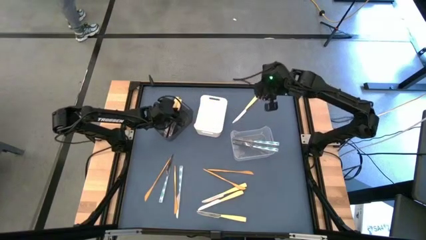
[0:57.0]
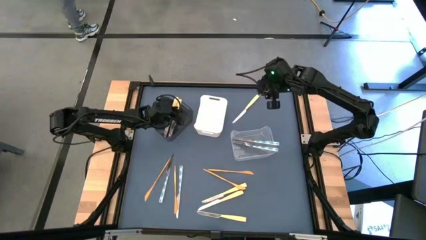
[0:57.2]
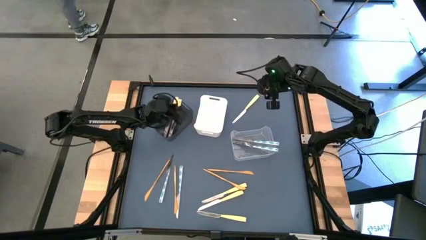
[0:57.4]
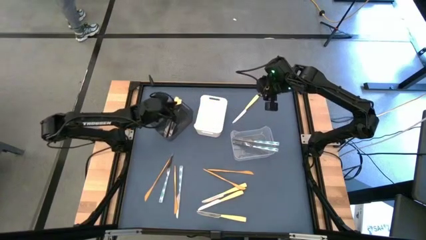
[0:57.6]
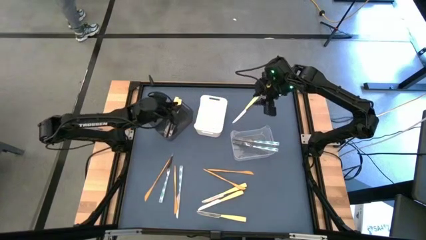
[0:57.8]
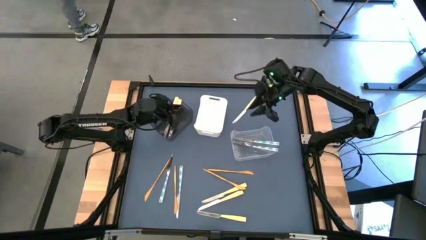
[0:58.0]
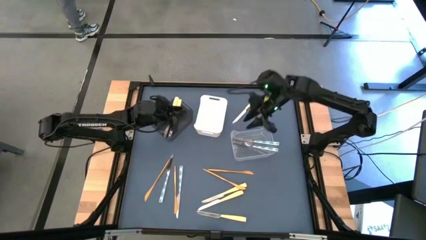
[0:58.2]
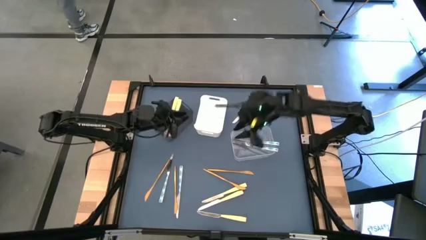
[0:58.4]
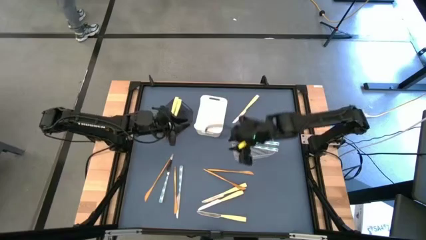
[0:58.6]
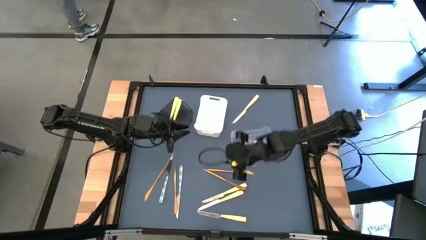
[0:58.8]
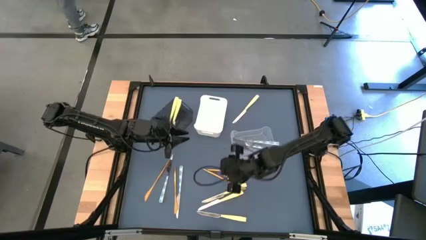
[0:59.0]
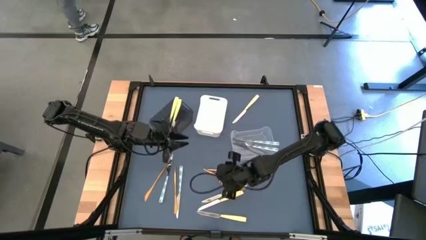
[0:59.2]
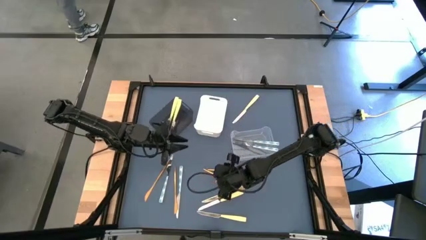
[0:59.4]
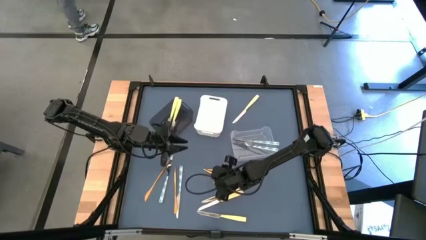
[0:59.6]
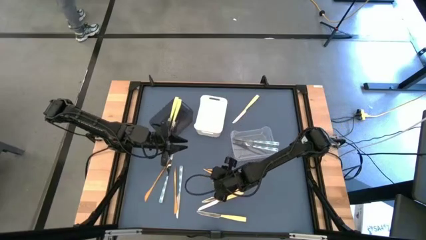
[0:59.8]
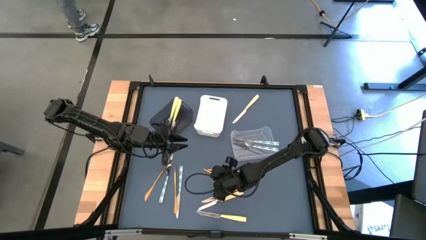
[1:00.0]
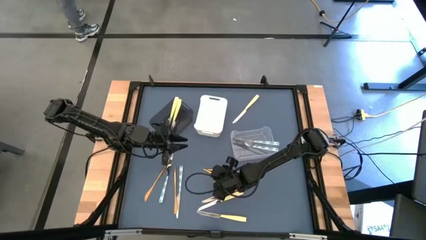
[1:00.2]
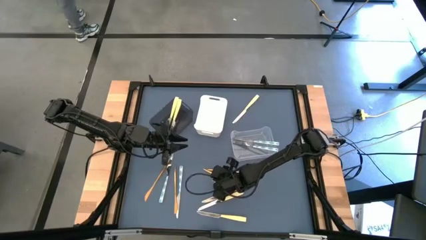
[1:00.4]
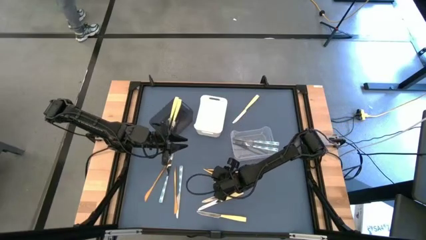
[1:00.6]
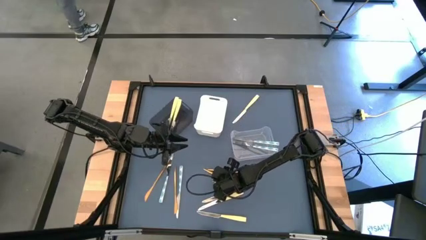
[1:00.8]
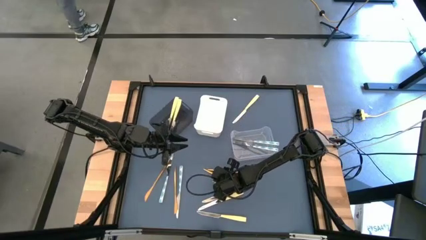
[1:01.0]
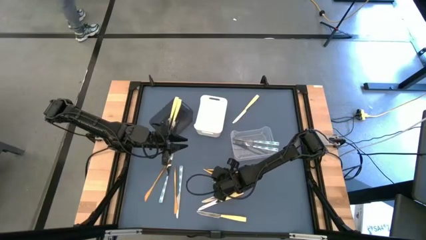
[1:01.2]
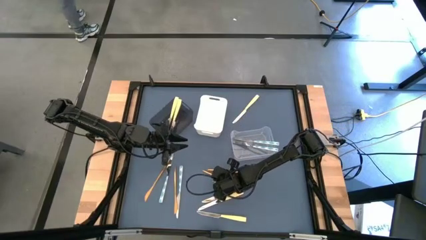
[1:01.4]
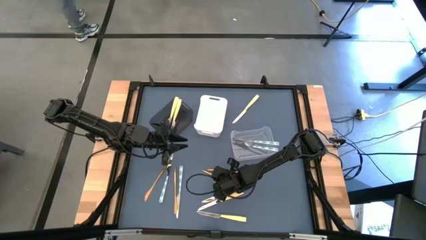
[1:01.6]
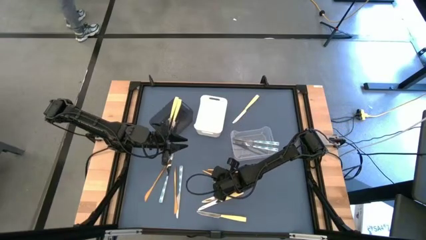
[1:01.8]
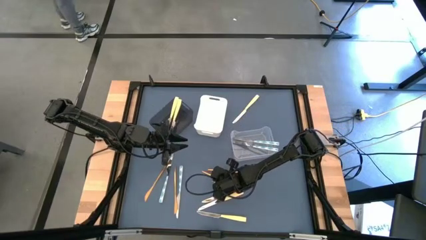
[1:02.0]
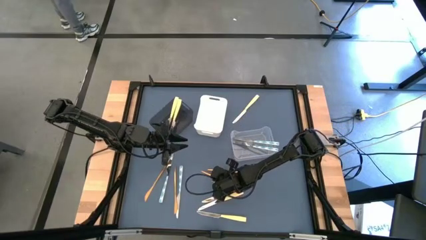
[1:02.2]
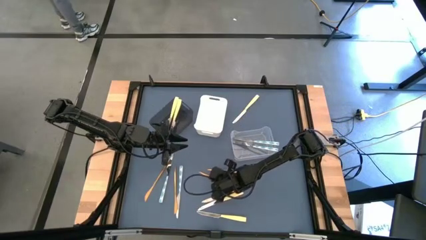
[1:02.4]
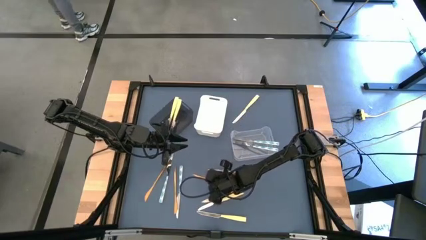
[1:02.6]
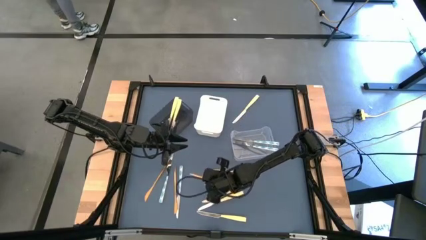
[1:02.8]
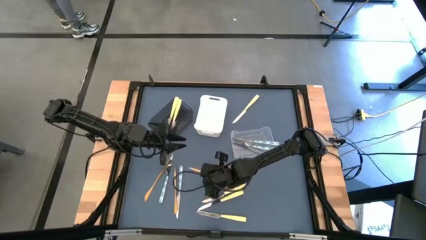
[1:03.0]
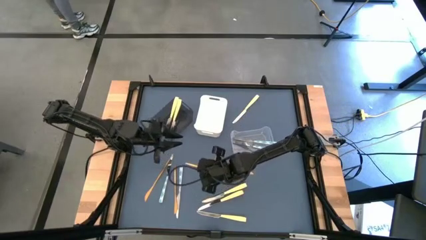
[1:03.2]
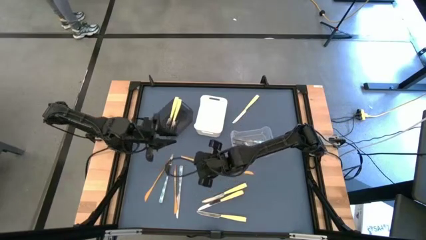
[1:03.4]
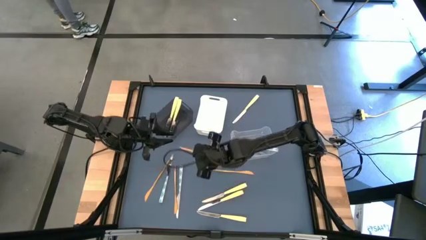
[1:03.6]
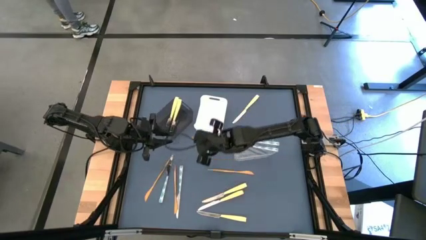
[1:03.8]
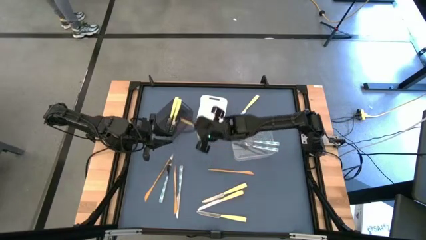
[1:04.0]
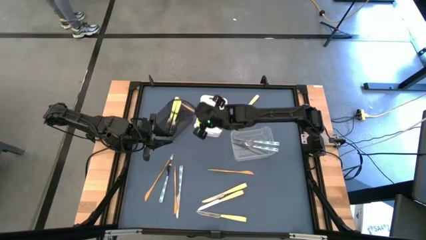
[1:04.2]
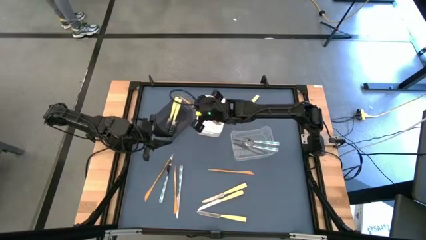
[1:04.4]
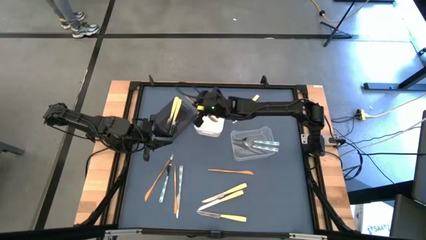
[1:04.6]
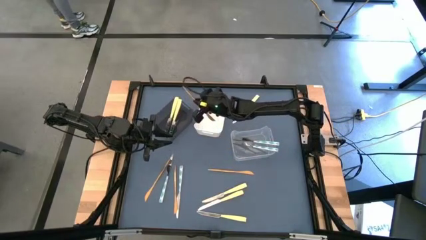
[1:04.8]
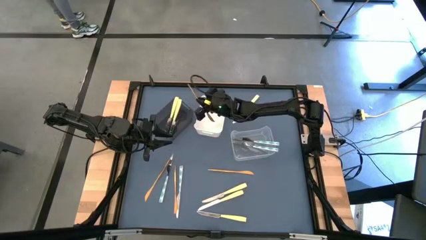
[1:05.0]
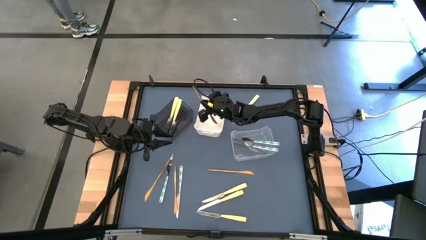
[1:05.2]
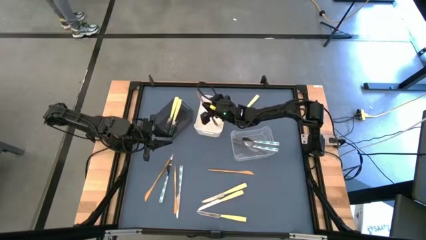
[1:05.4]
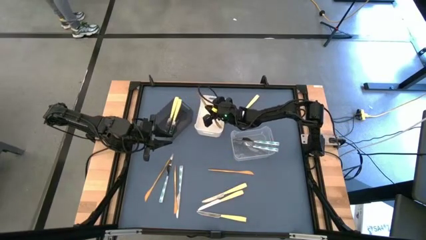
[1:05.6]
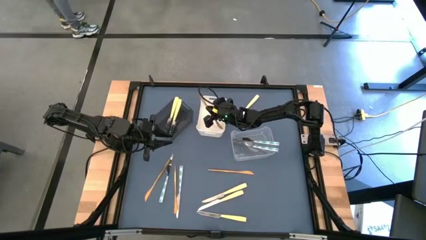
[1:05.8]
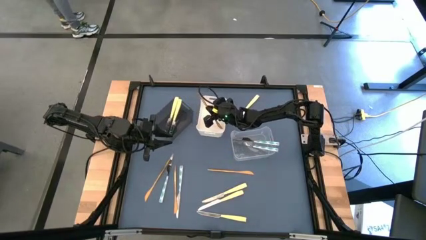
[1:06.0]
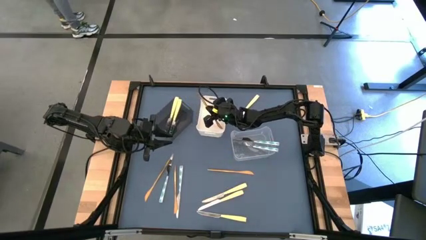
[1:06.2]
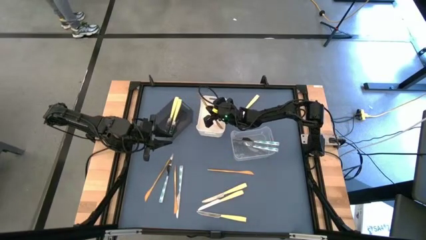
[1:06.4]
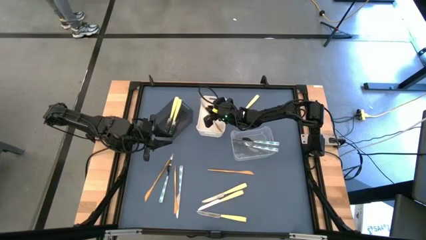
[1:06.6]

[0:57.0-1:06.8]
Task: Sort silverware by color (type)
Put the middle left gold knife into the white bin

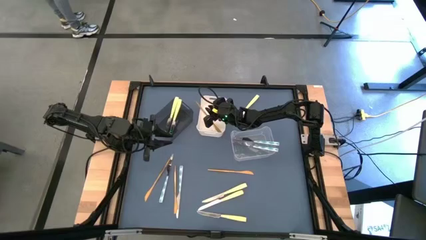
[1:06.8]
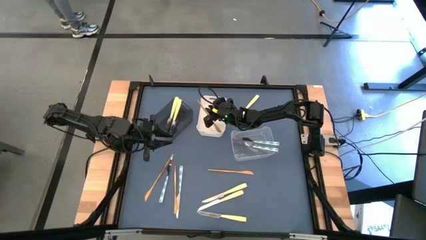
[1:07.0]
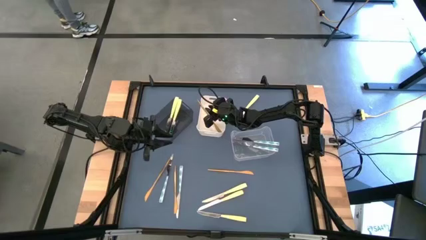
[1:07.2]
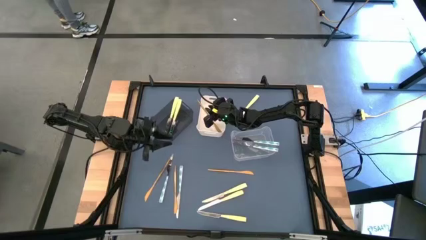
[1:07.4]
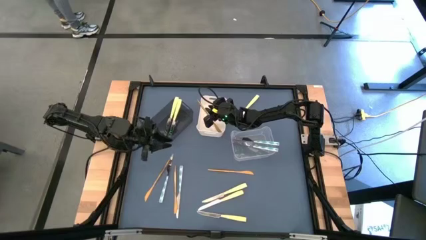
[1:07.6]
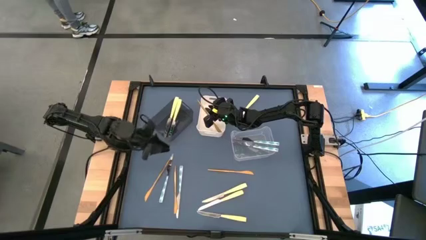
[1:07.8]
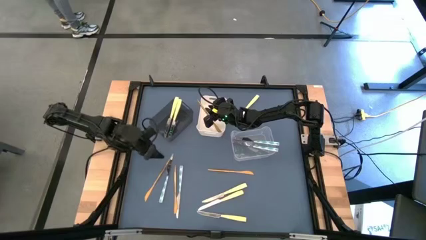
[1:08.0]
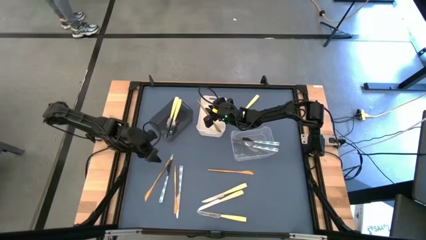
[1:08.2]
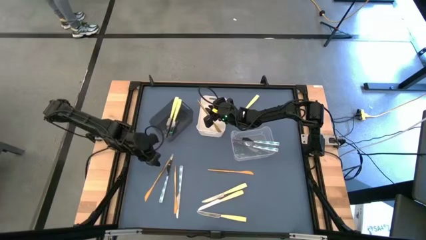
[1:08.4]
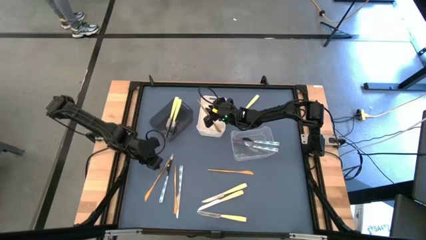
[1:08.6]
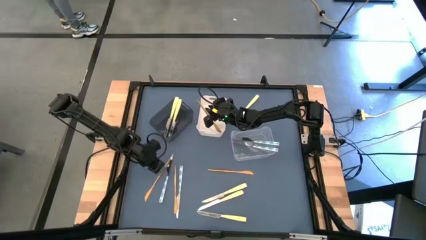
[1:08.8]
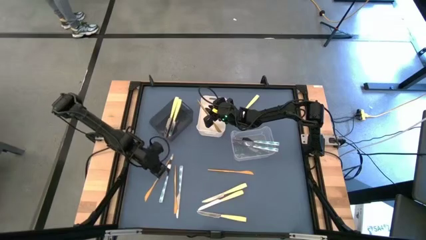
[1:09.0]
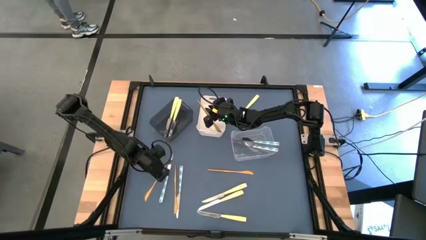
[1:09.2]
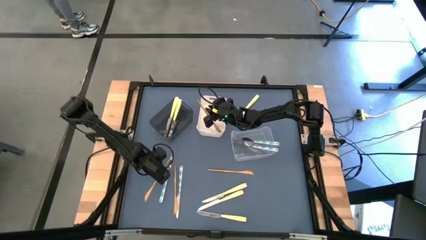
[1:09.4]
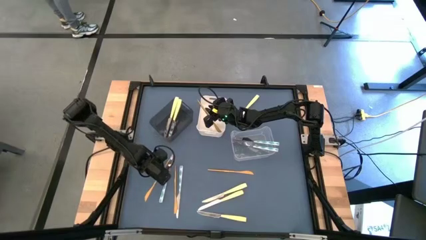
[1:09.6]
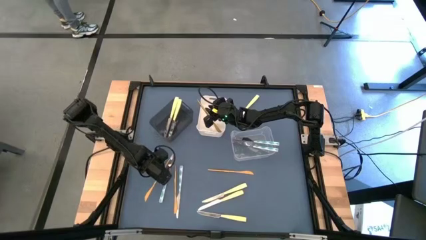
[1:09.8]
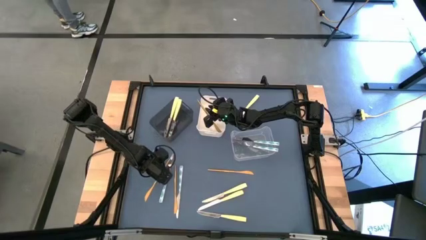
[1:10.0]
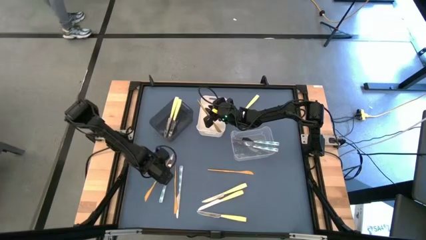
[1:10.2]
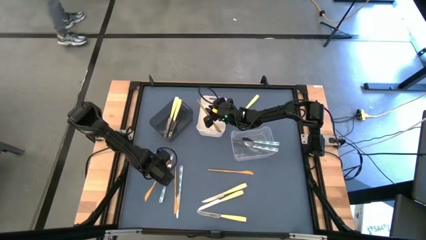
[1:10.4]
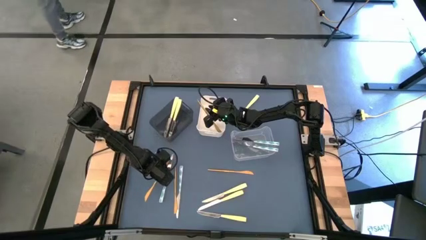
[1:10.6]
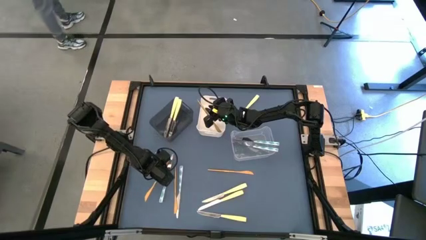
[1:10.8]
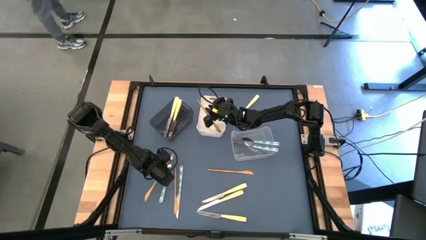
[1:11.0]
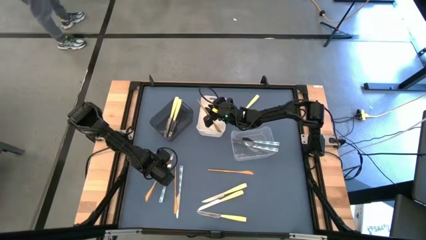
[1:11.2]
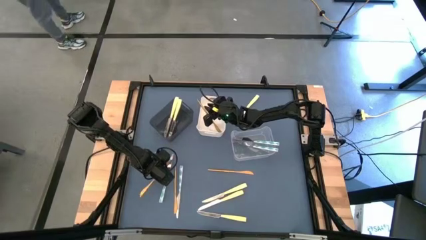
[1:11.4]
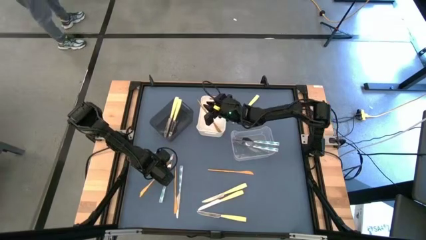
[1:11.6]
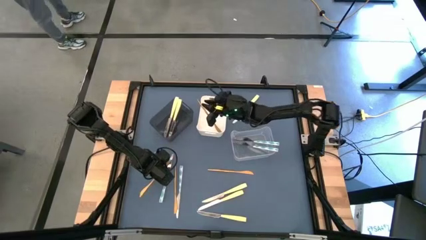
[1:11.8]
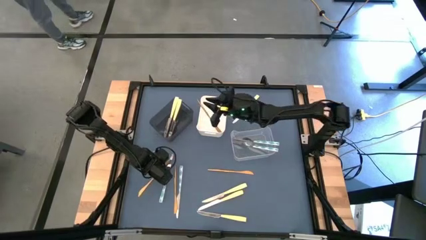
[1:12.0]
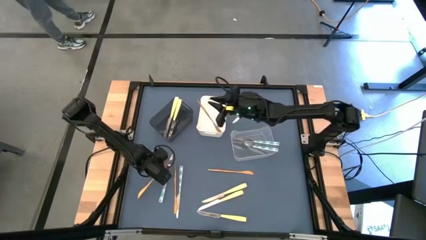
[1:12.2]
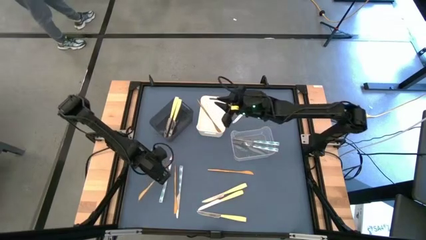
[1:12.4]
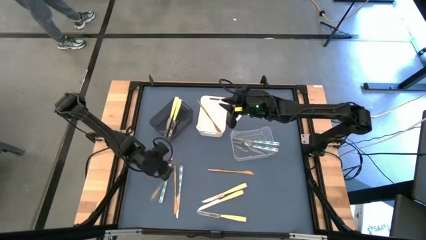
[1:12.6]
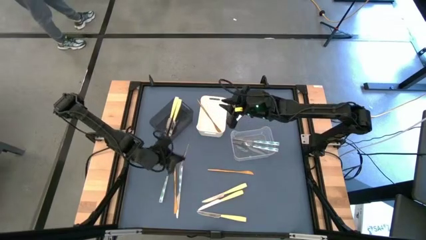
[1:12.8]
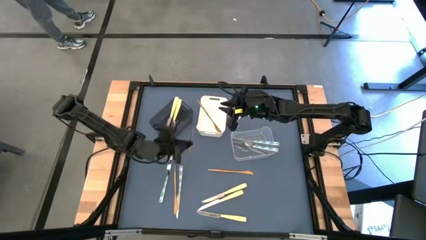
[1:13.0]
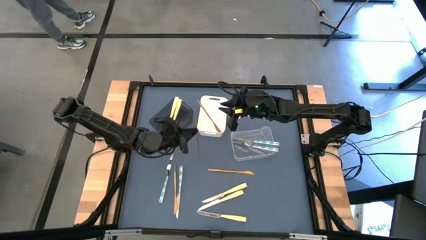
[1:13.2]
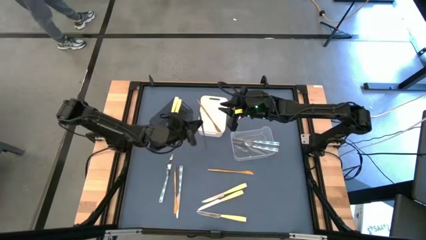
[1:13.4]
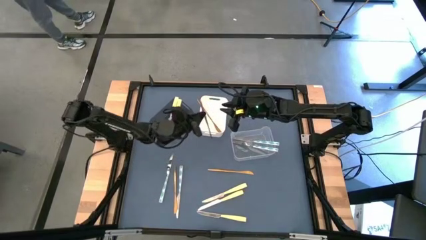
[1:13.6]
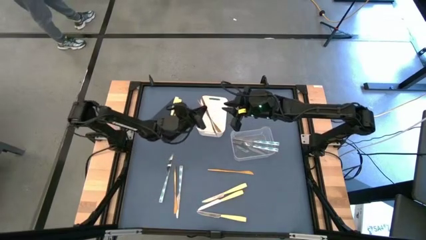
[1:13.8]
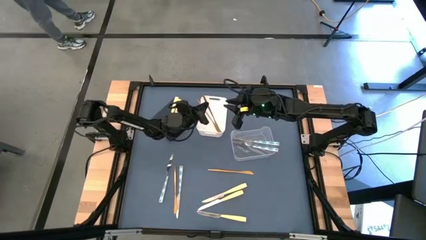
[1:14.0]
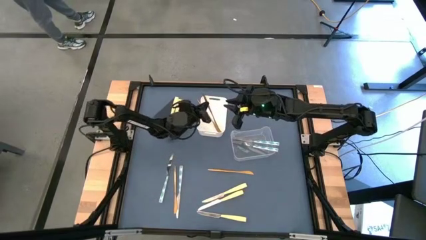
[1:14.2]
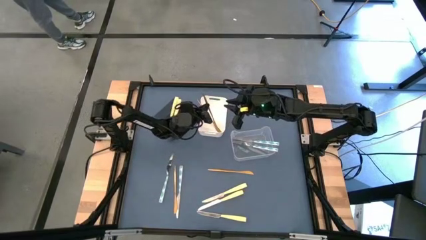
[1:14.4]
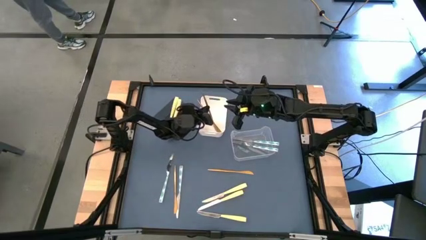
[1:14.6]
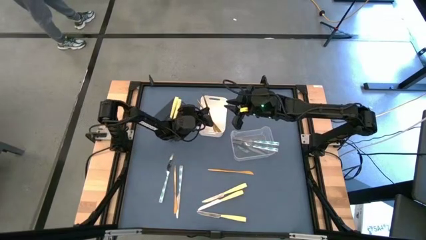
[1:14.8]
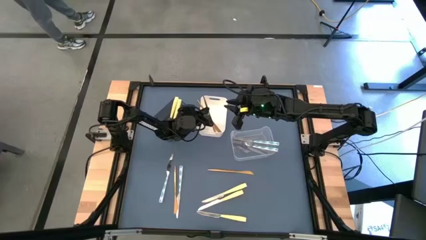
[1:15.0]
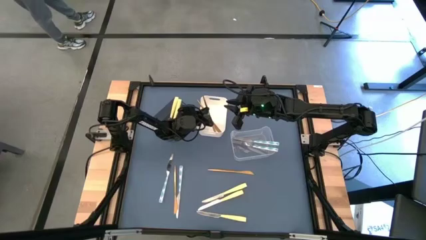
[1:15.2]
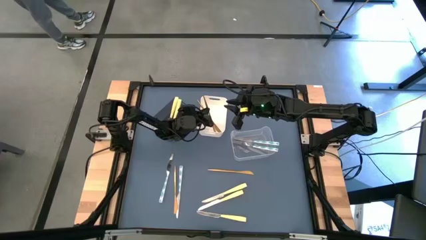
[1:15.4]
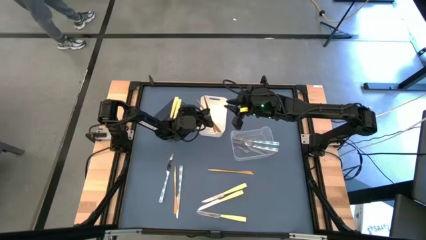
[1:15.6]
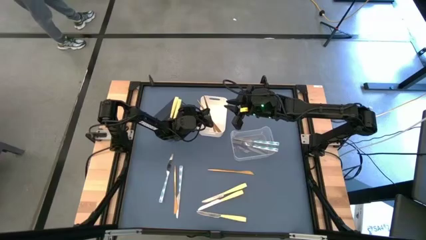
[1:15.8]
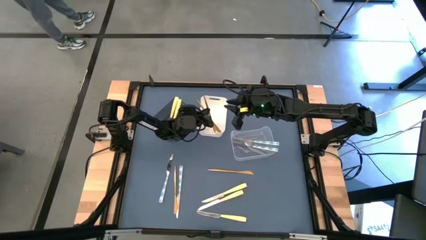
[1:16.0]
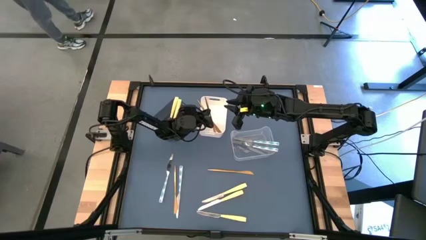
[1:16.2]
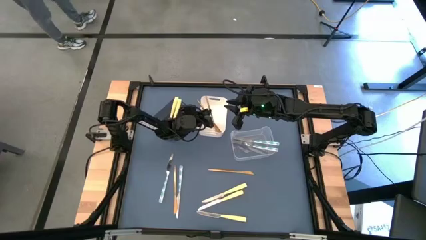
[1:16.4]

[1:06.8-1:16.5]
Put the left gold knife into the white bin
